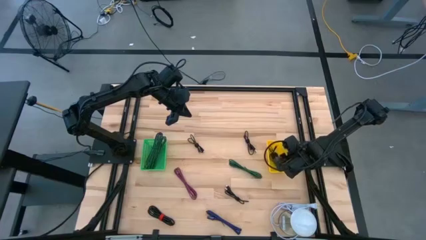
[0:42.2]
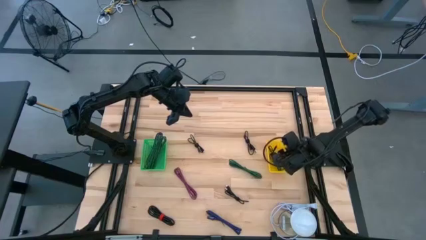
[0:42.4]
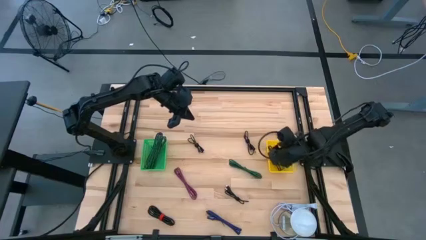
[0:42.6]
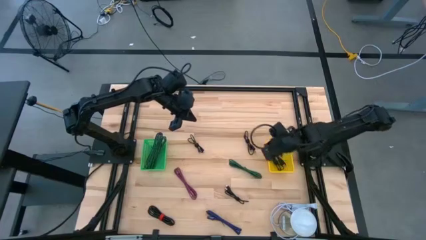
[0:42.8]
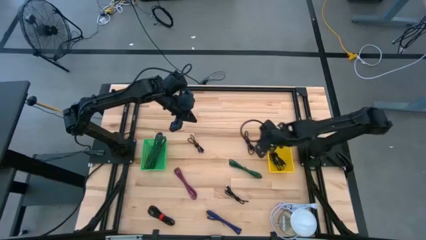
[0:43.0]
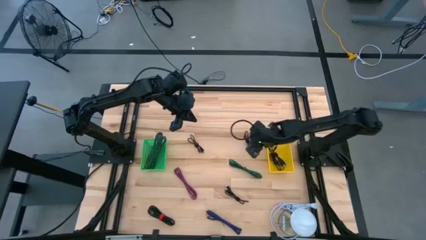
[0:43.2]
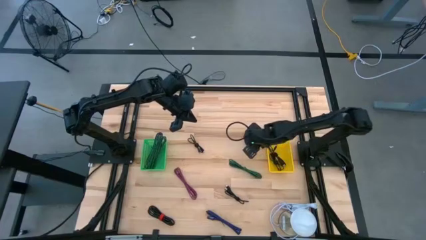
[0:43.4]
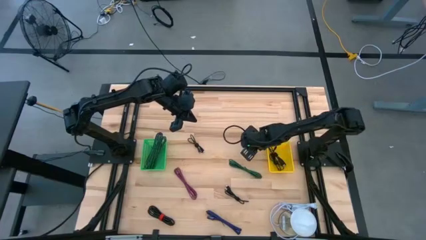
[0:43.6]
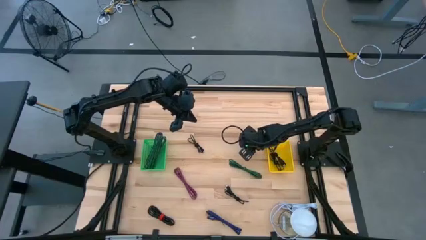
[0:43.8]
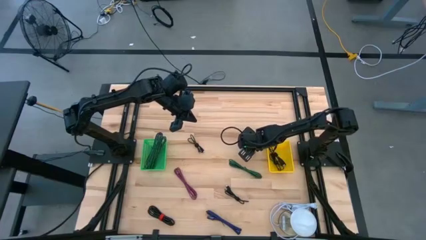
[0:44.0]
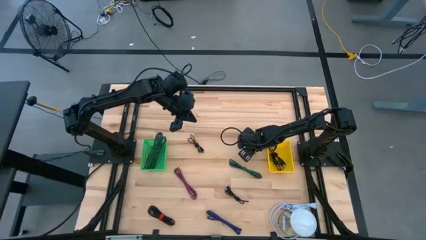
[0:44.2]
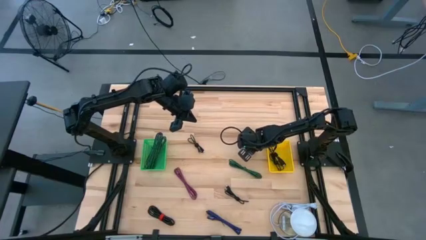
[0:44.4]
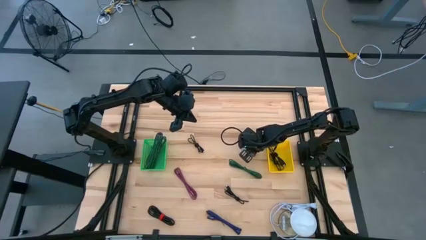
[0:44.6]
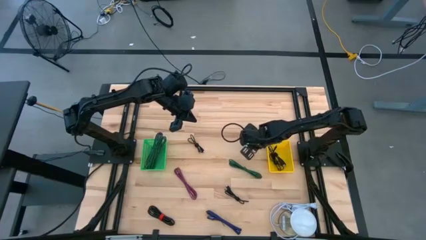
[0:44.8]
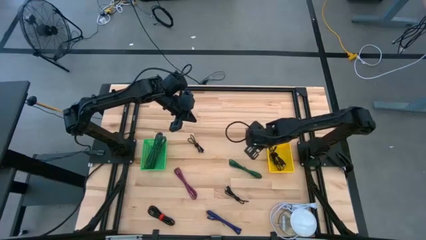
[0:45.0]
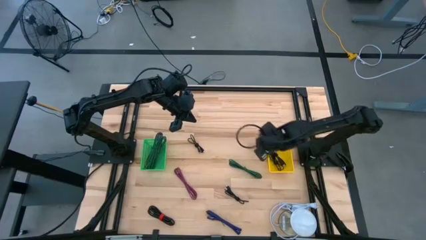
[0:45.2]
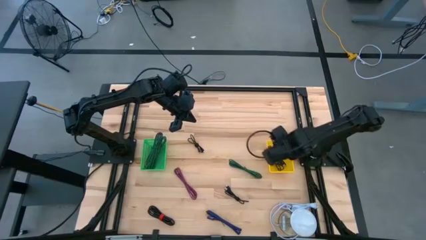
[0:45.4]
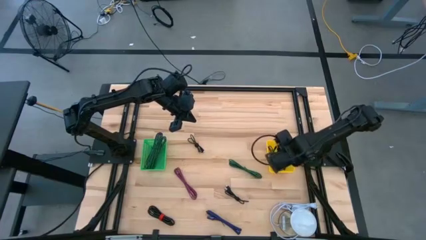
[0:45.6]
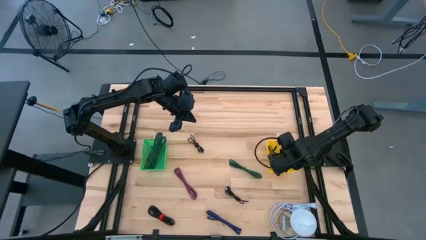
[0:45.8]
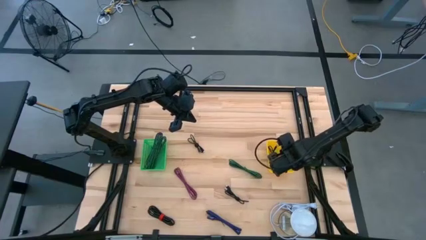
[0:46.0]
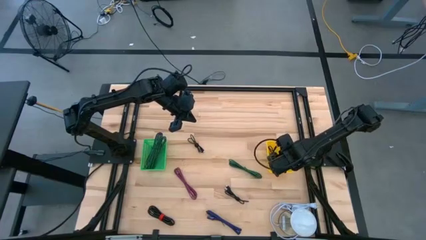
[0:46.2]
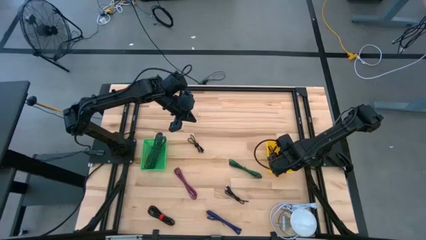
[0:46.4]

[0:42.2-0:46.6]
Task: Pick & Place USB Port
Put the black charger cable into the yellow bin

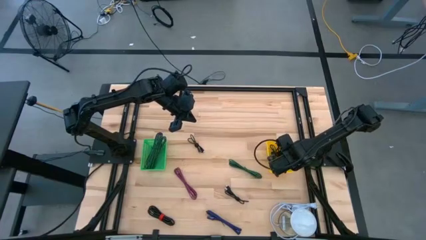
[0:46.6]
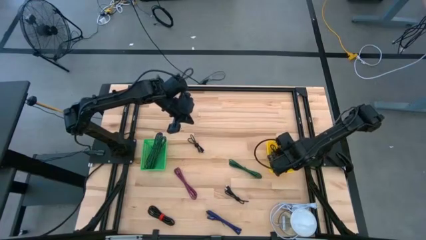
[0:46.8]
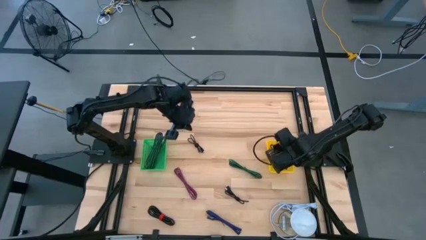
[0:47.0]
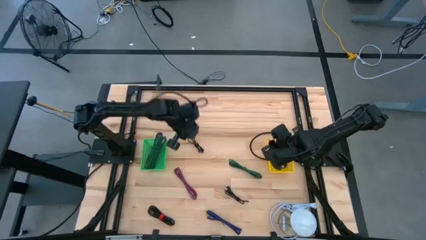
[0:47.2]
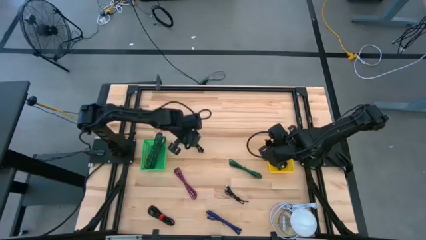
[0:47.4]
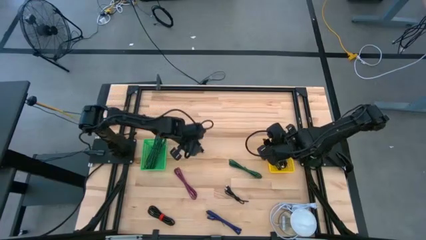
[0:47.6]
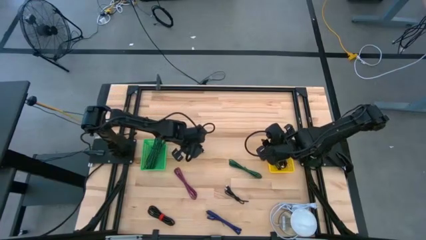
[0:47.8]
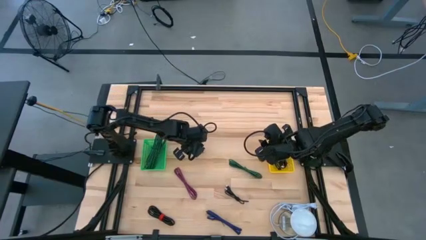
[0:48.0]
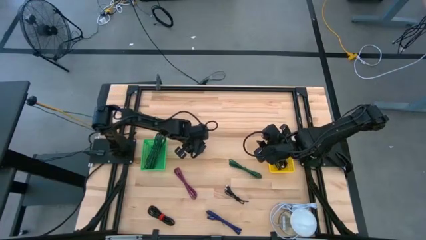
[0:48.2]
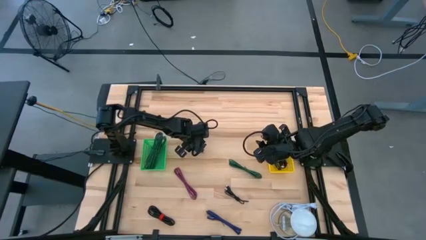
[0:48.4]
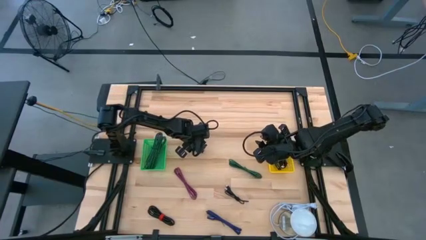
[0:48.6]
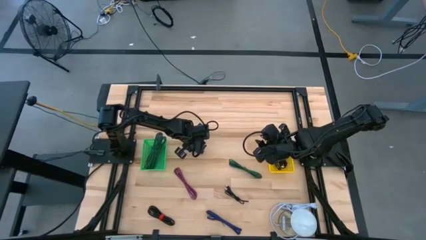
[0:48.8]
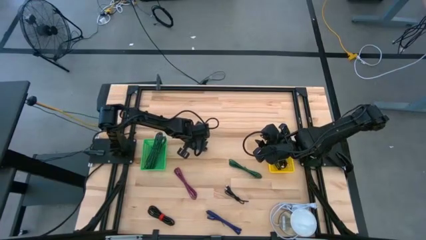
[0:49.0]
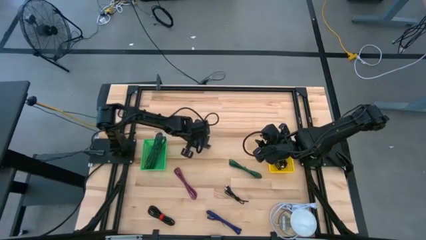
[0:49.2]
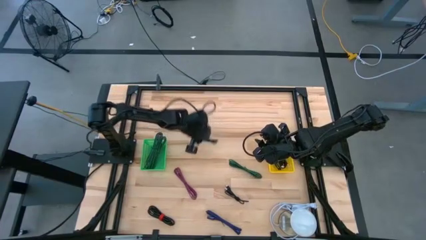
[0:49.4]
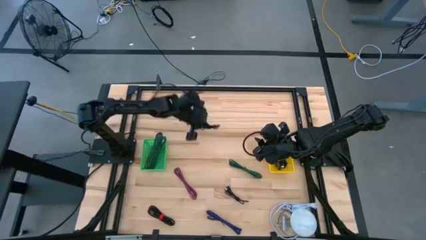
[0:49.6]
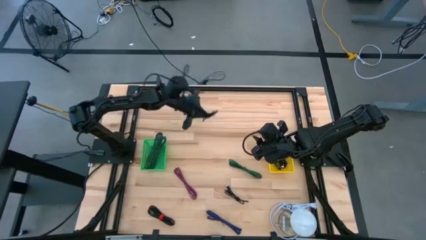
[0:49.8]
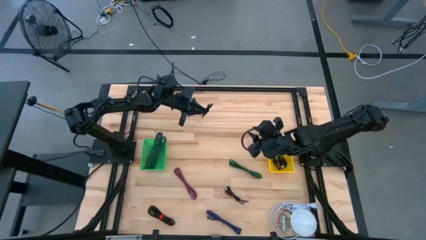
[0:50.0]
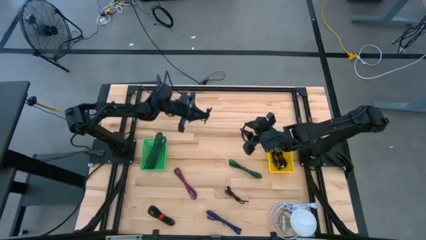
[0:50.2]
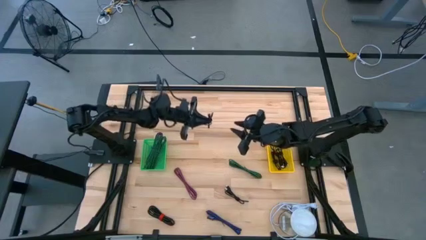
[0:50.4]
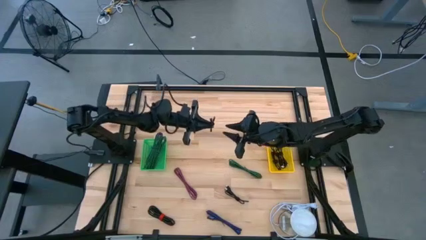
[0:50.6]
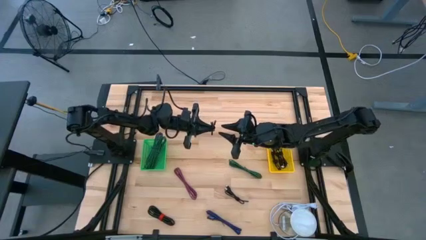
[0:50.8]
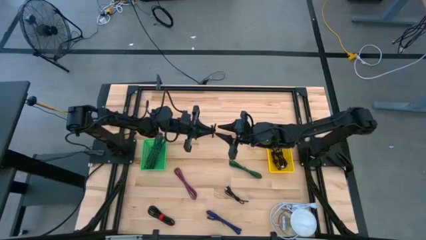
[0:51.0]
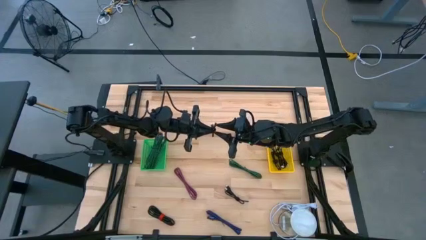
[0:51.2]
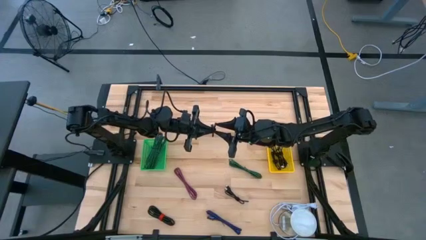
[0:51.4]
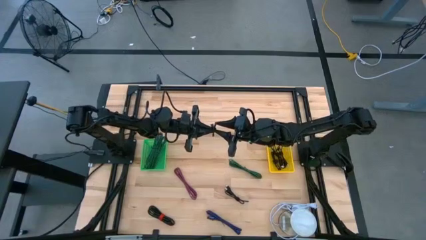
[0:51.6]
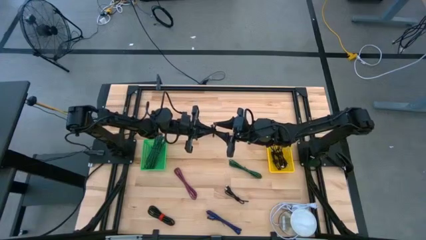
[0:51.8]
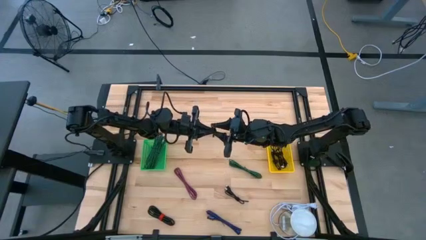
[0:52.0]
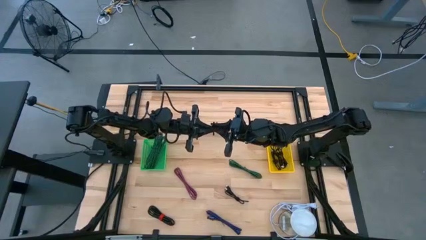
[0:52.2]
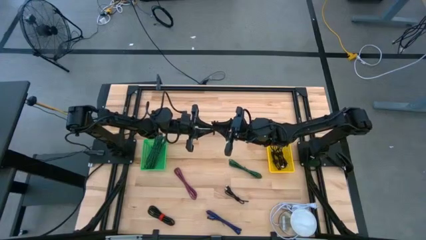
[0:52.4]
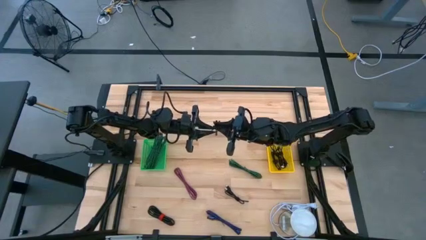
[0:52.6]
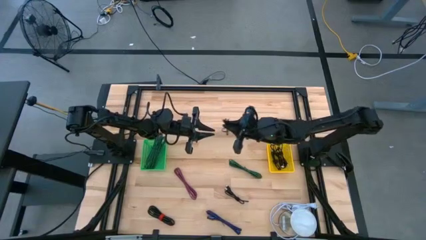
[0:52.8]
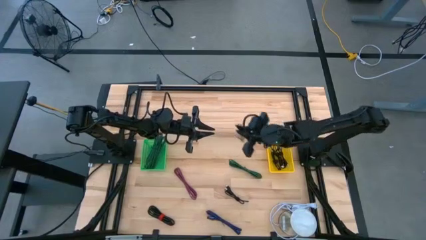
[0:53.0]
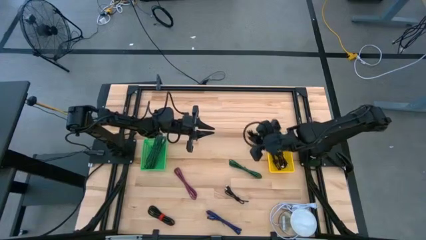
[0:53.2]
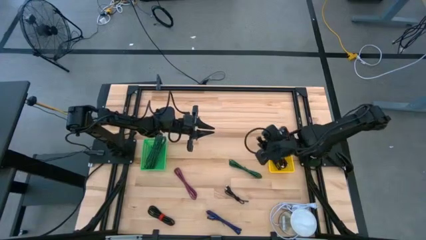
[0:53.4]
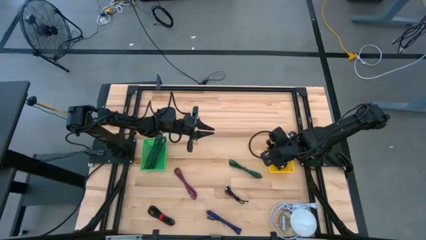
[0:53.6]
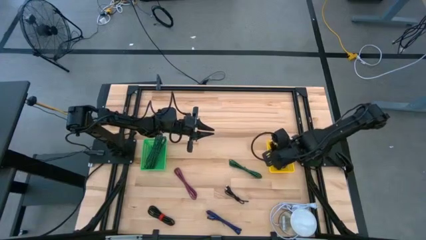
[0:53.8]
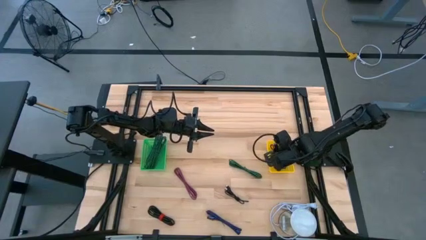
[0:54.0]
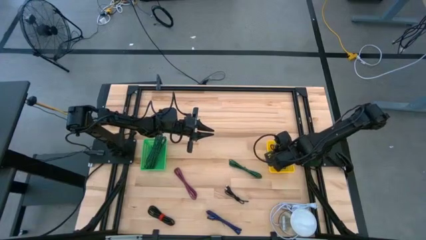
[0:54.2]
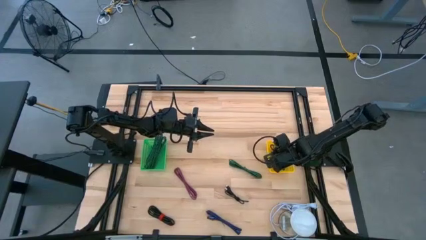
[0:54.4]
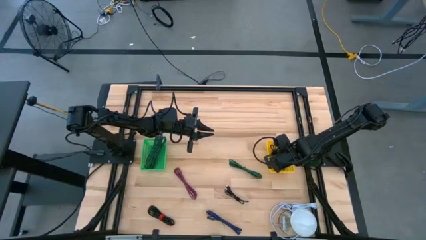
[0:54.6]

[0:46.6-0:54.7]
Put the black charger cable into the yellow bin

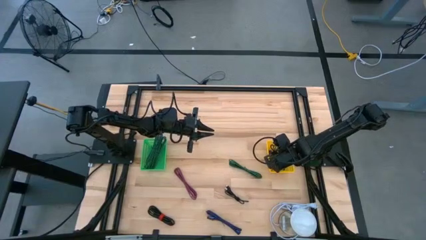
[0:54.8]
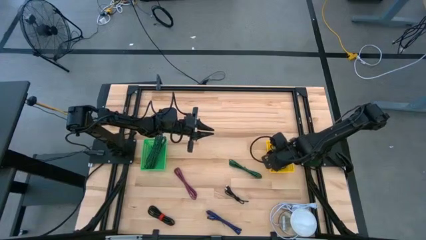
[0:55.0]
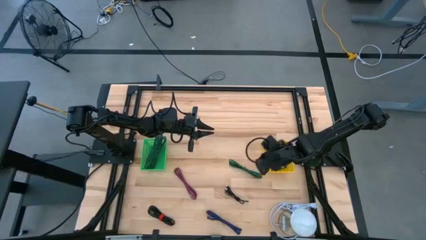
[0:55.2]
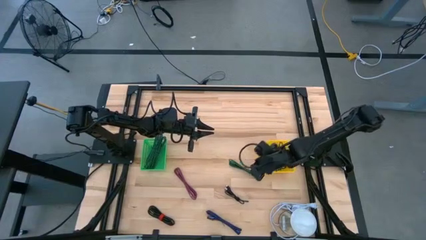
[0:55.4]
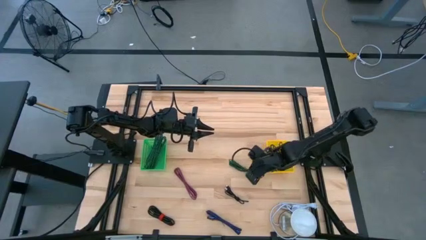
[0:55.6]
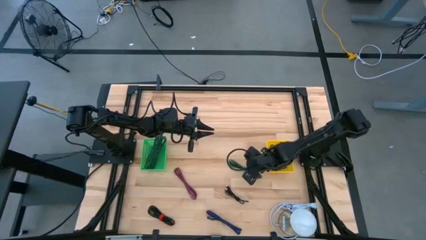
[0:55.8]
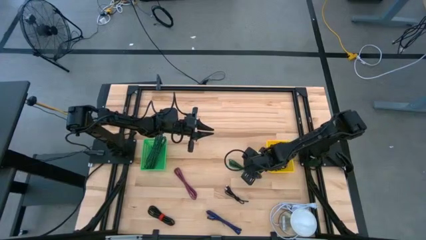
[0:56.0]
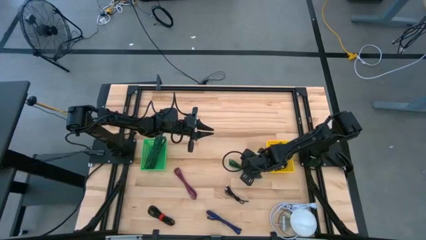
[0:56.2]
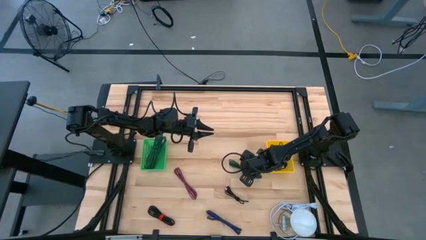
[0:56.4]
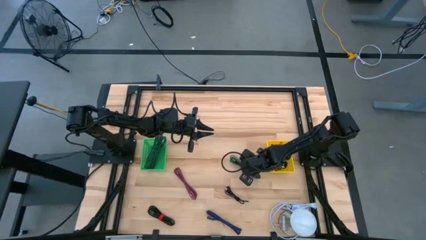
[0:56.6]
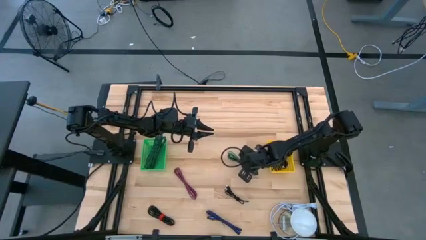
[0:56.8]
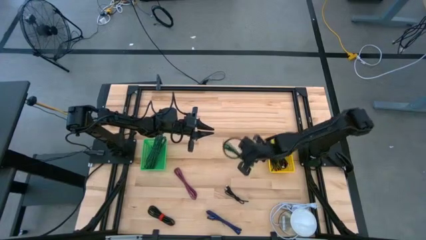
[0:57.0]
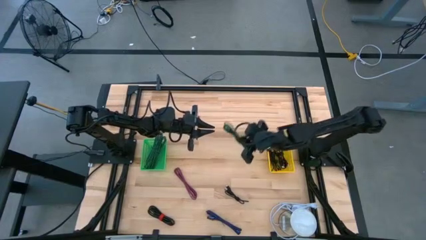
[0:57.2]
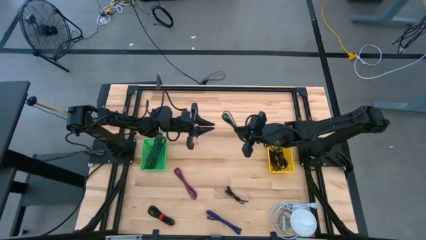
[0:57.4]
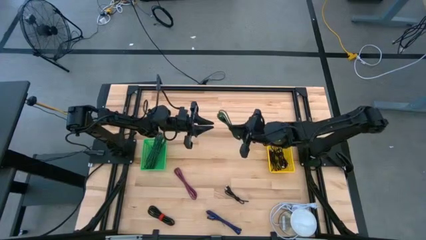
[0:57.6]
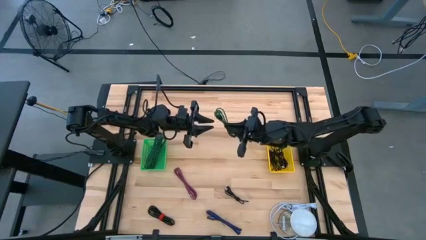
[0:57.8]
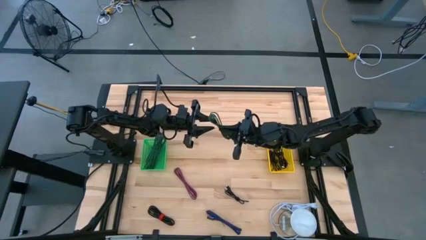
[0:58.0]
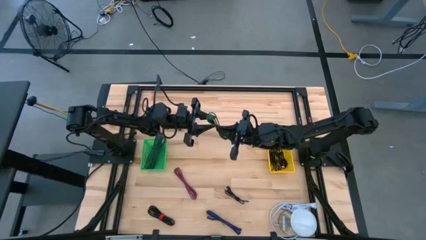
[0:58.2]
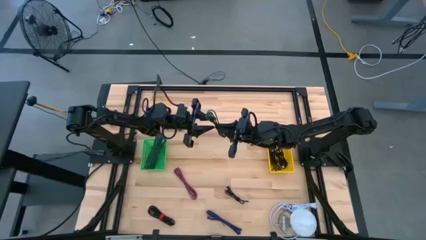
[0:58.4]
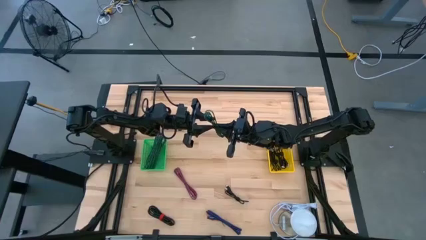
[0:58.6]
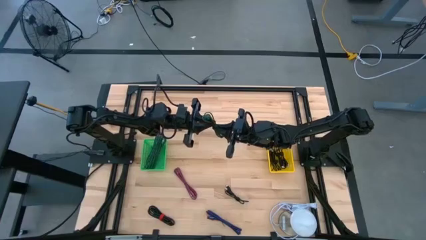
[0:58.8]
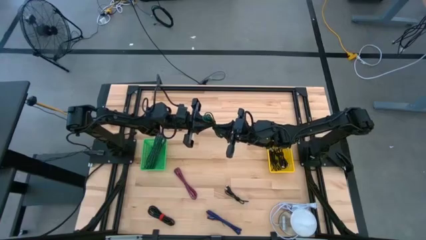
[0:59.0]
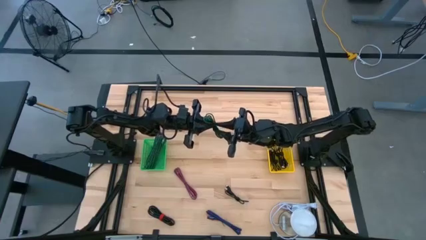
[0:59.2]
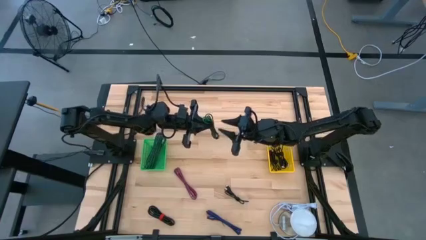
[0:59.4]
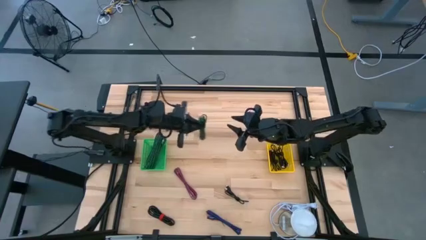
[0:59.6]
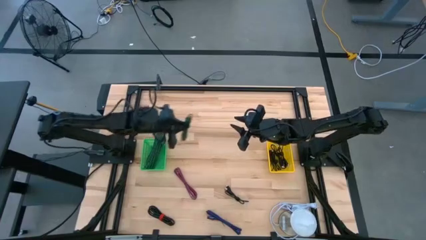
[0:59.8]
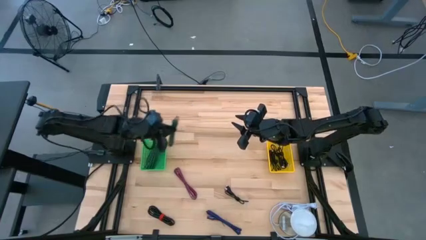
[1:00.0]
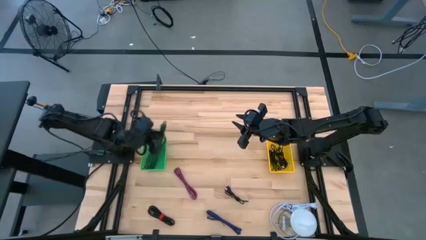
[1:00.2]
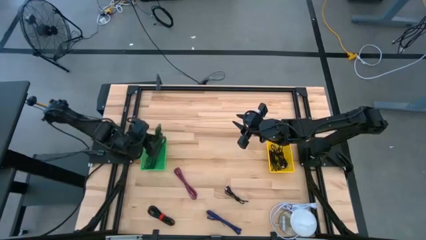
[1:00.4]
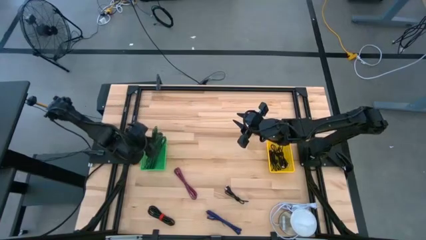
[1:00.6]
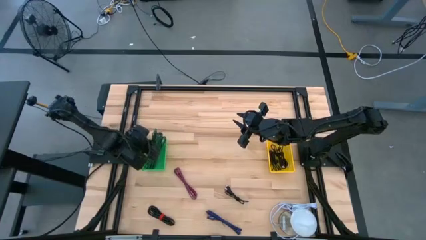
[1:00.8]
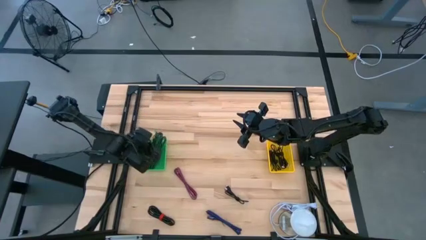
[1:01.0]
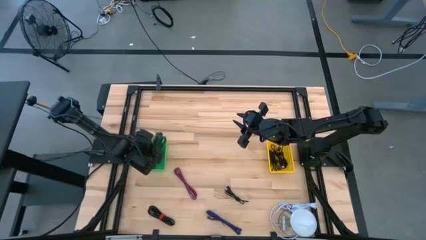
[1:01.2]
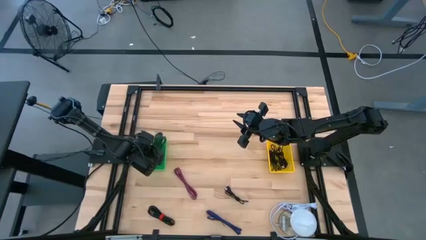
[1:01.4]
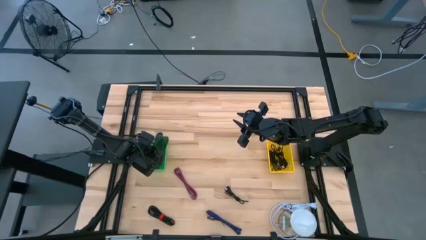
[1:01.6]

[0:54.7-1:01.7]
Put the green black charger cable into the green bin
